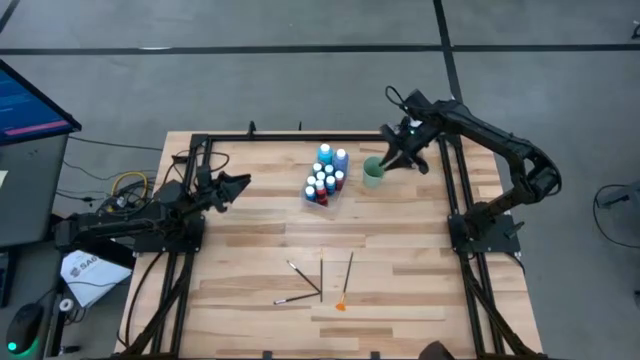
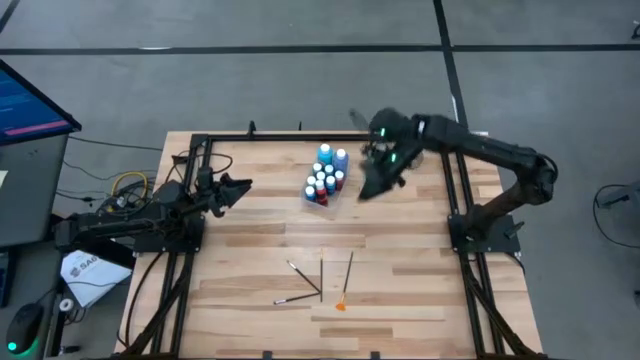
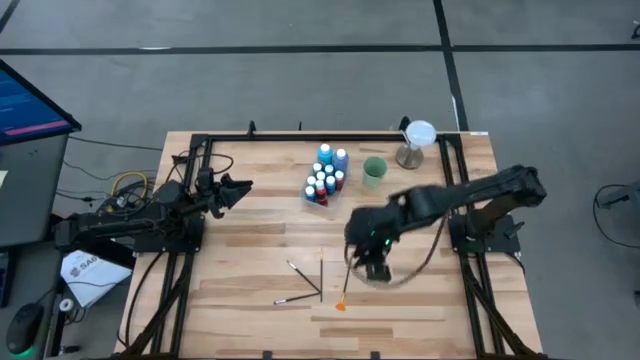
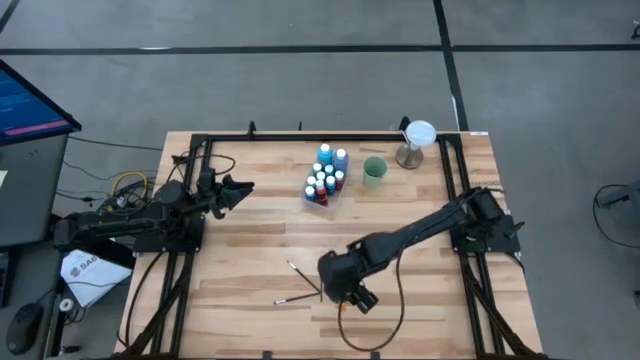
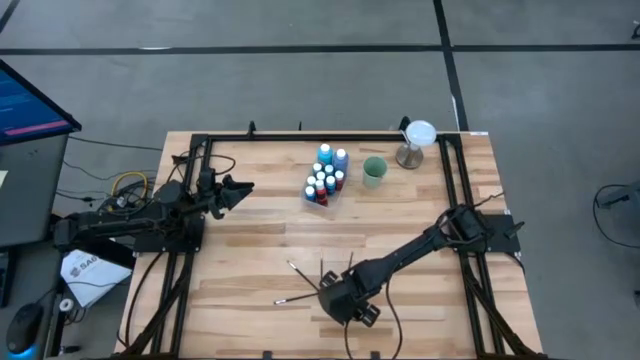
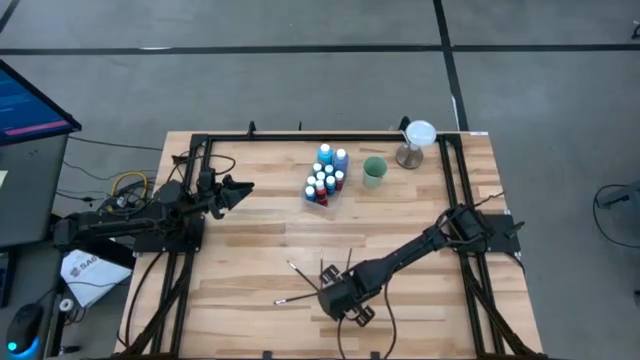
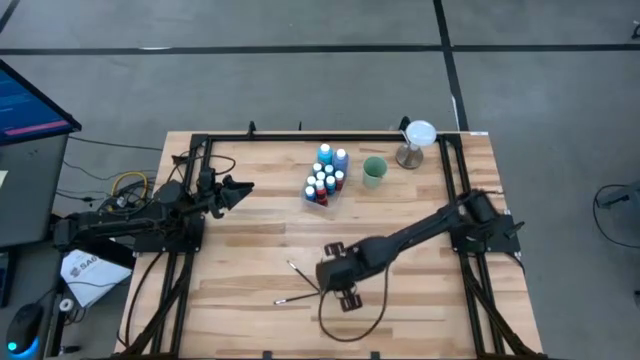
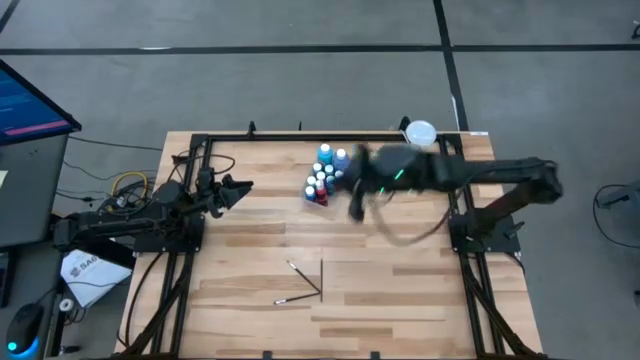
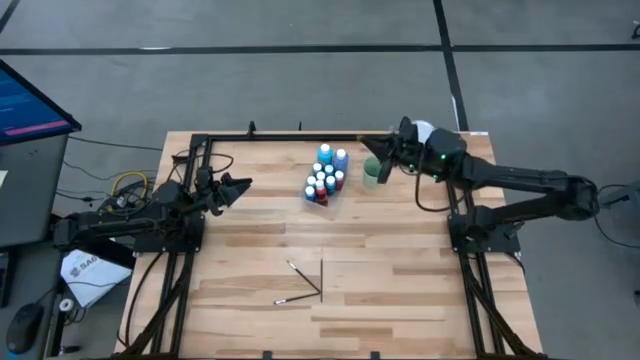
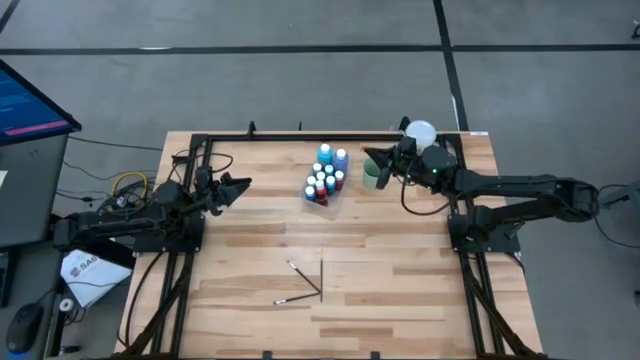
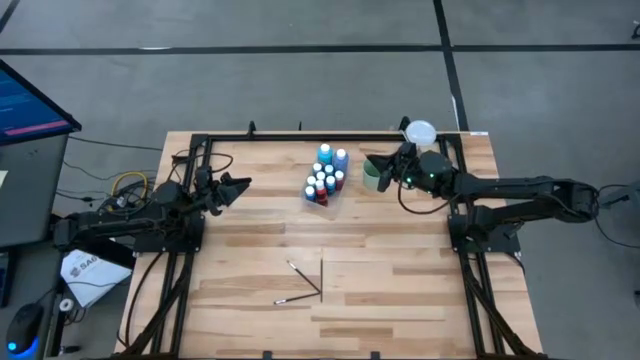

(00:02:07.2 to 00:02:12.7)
Task: Pick & Place Paint Supplies
Put the right orange paint brush into the green cup

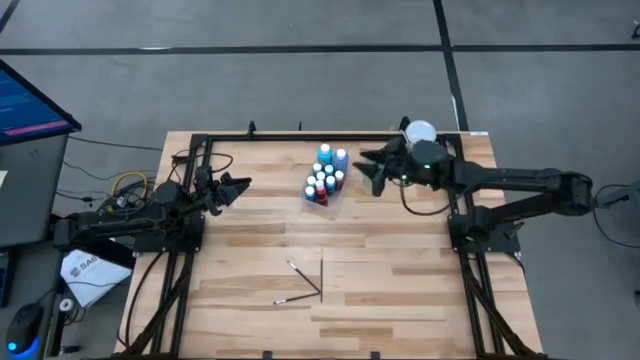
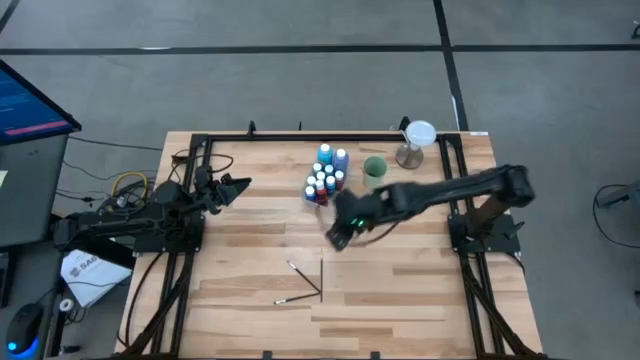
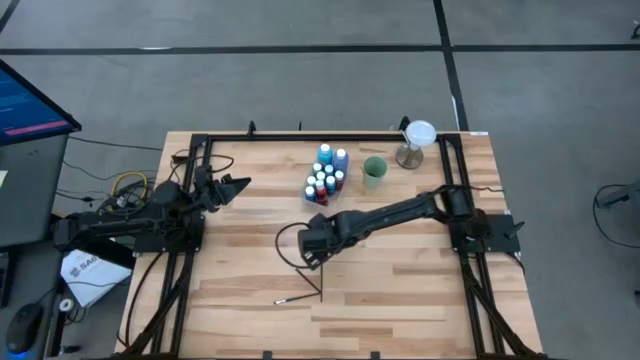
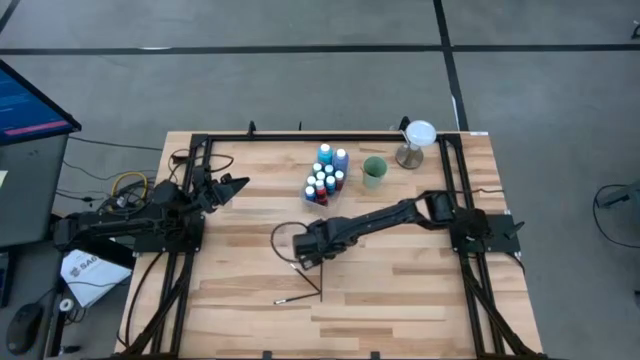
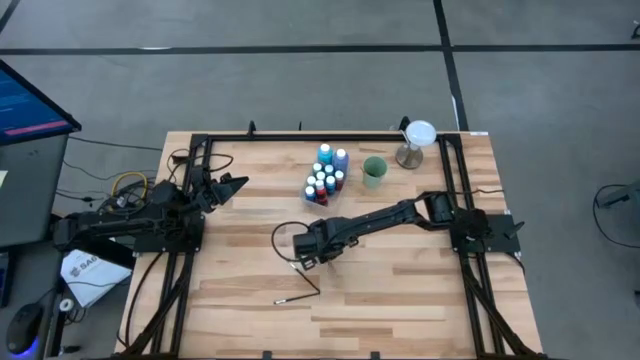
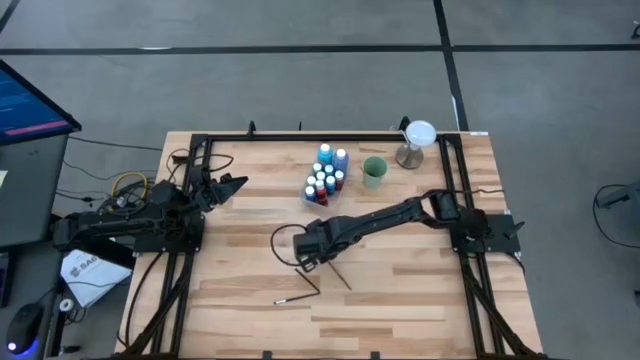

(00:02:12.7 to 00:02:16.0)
Put the orange paint brush into the green cup

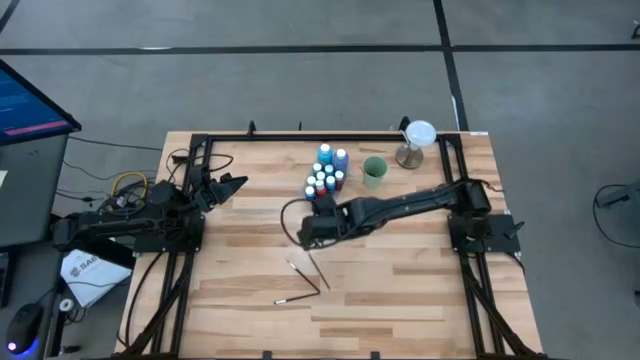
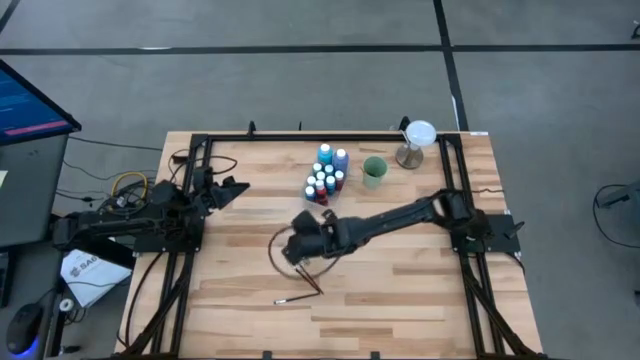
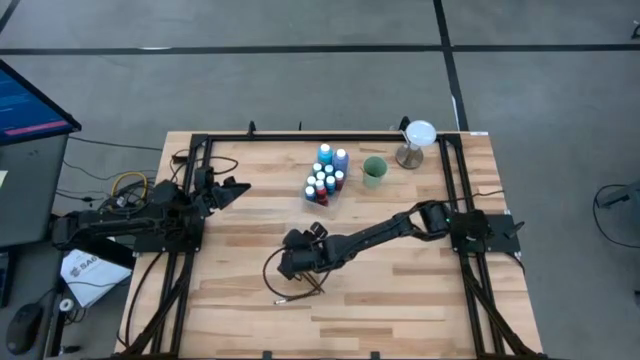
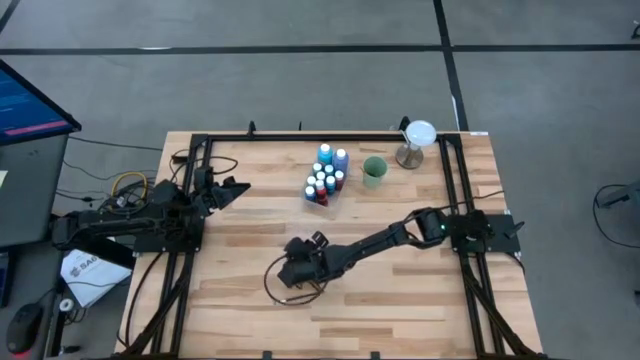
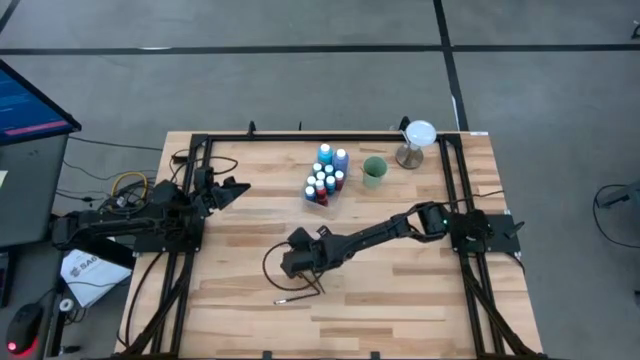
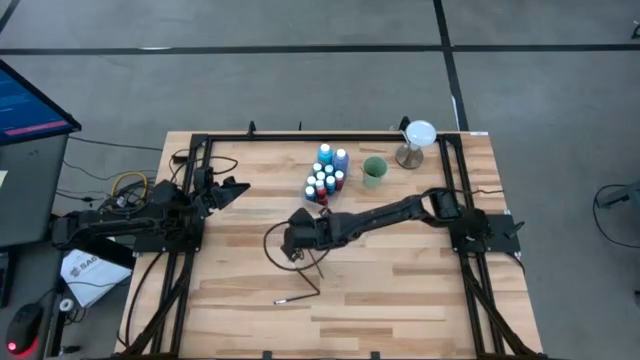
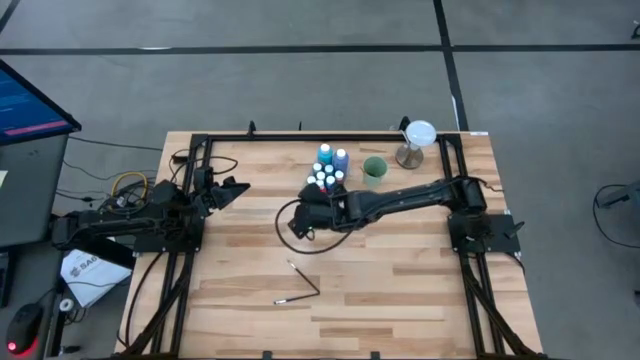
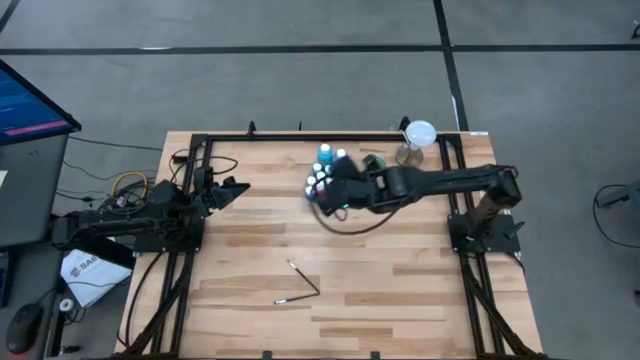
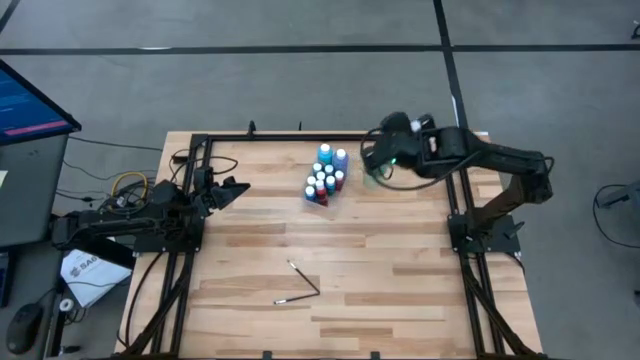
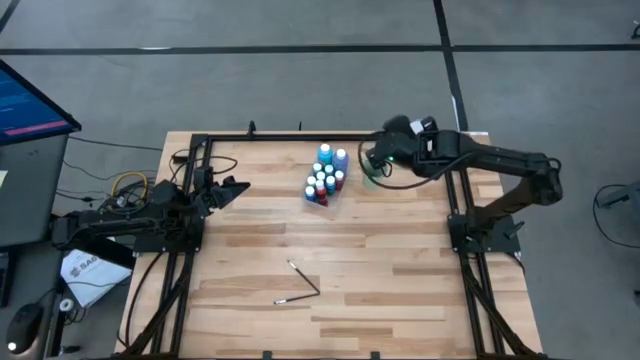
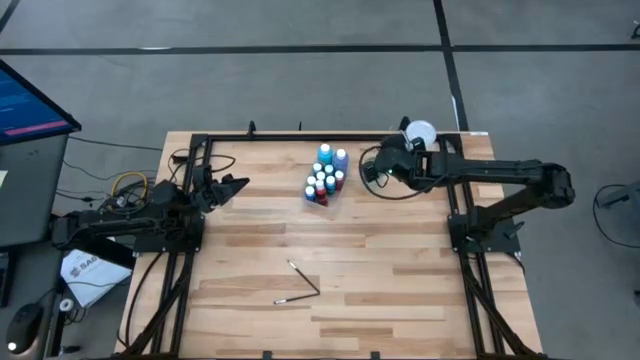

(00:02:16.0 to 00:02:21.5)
Put the orange paint brush into the green cup

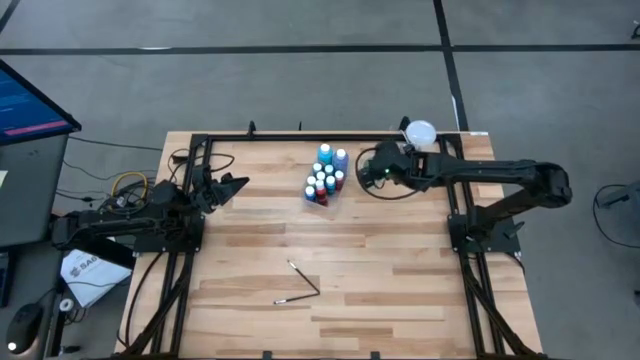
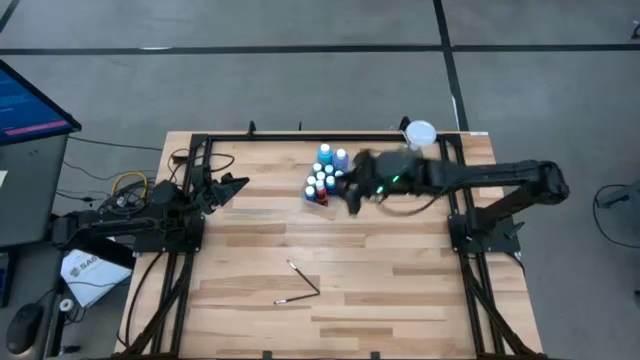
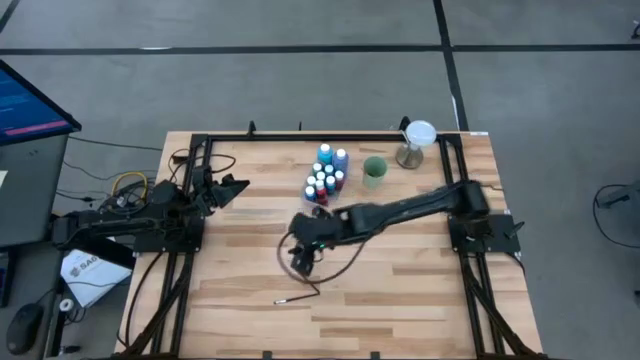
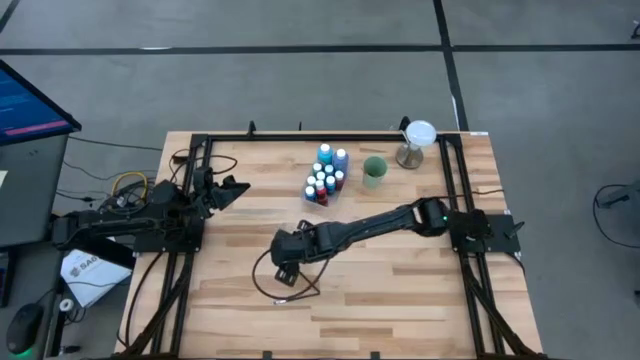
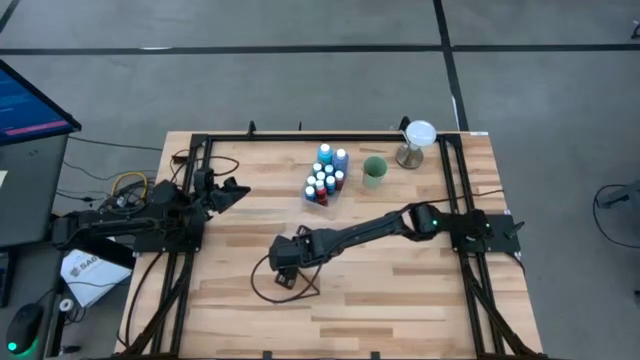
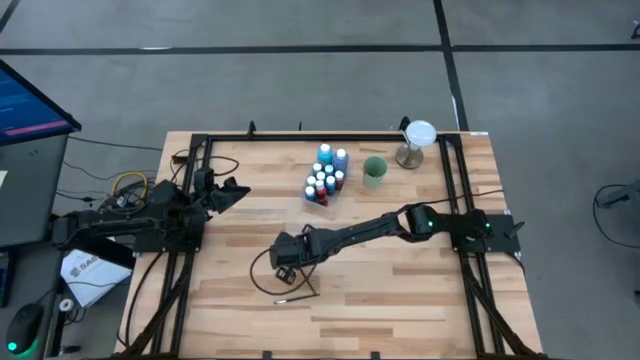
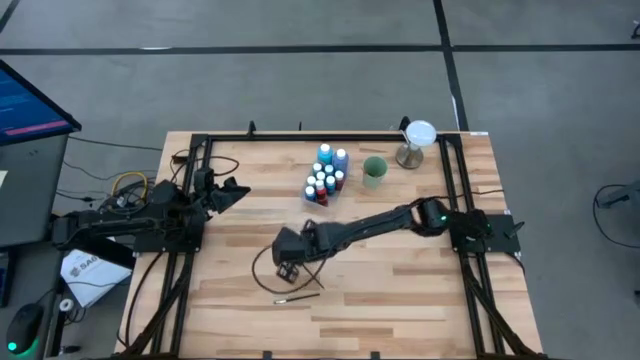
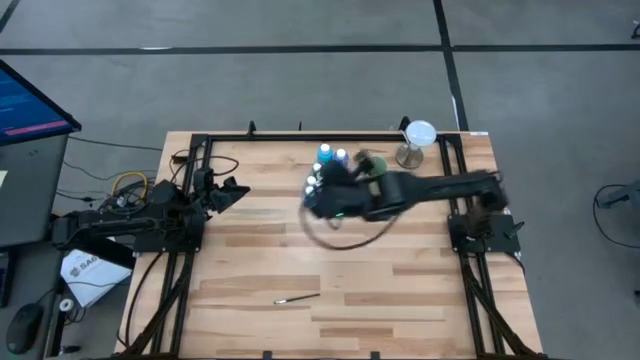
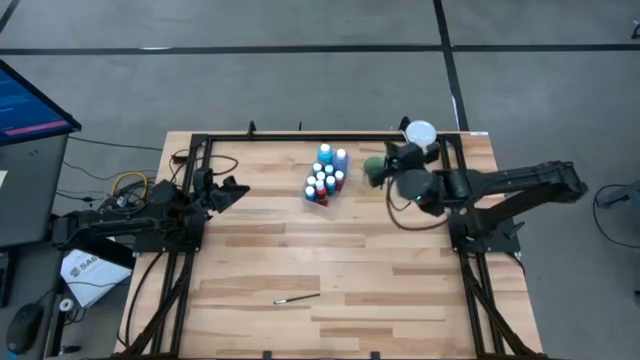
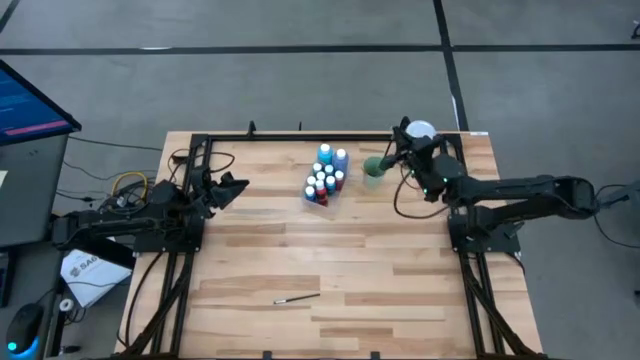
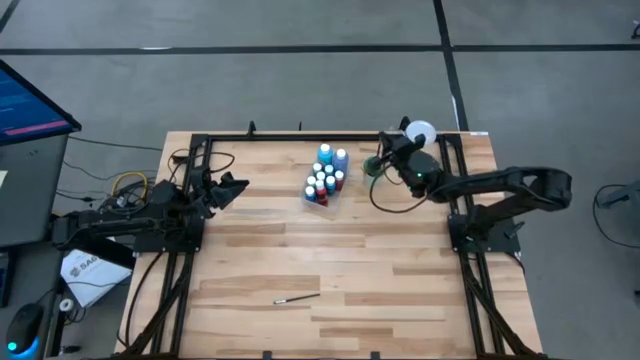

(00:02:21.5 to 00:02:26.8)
Put the top black paint brush into the green cup

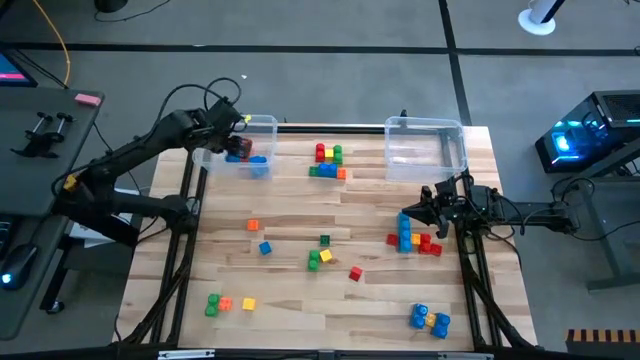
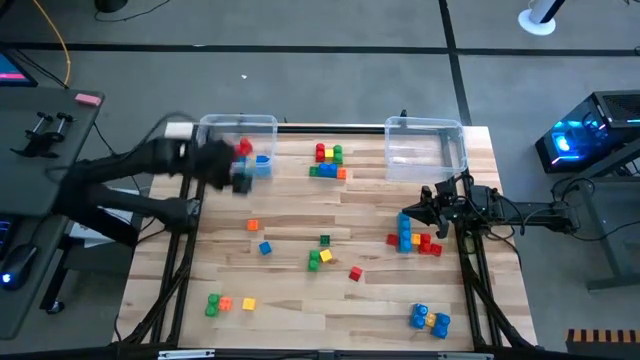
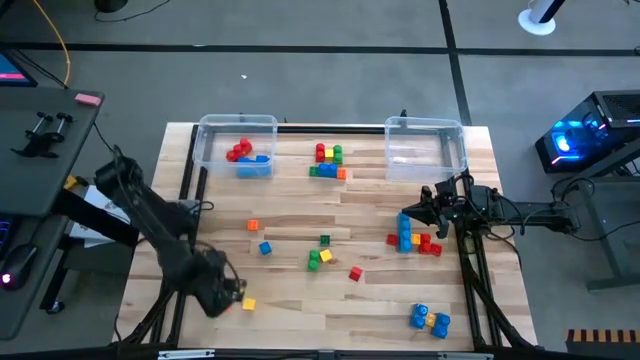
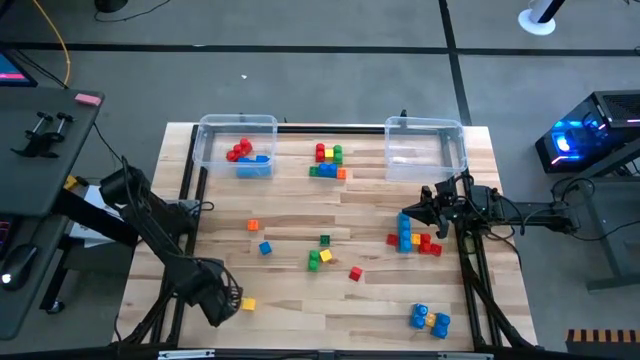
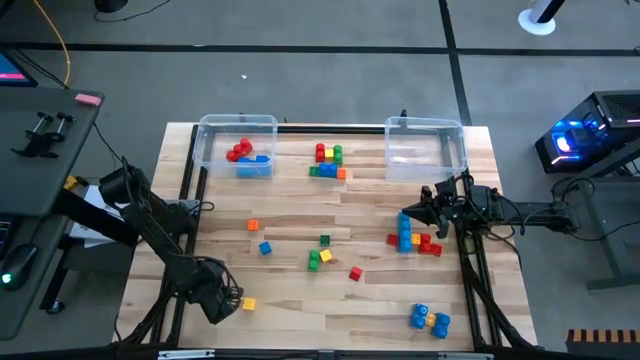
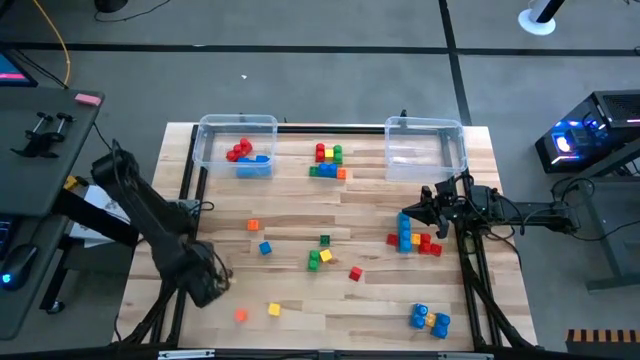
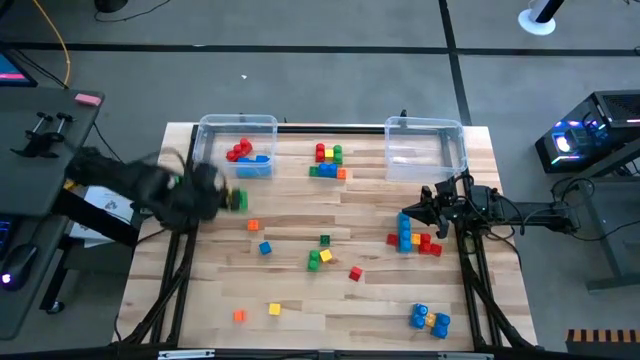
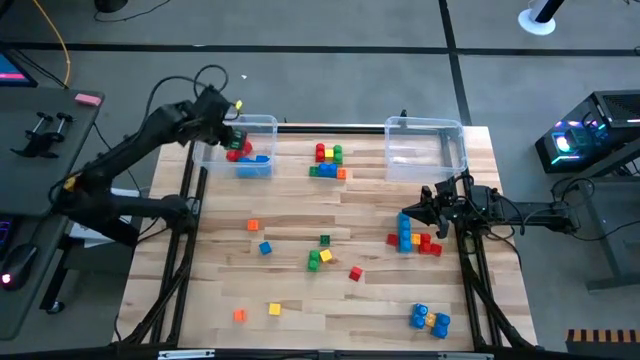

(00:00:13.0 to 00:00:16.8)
Task: Sort blocks by size
Put the large game piece into the left transparent bin
